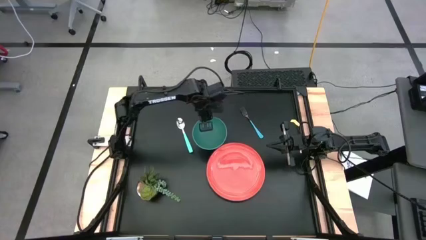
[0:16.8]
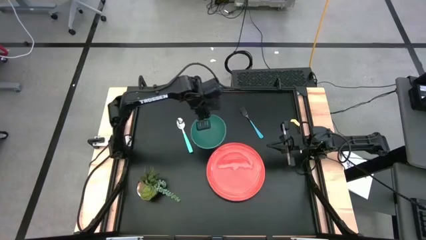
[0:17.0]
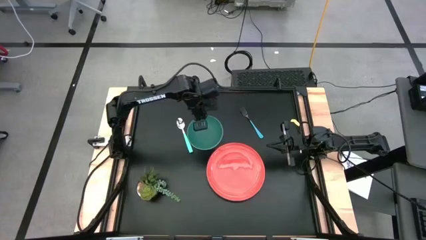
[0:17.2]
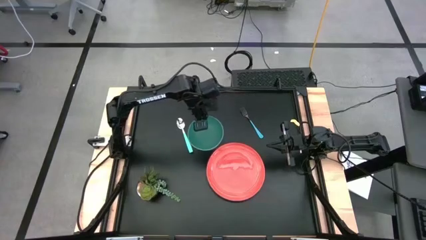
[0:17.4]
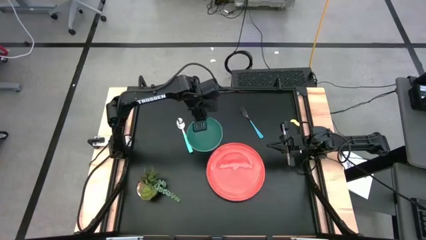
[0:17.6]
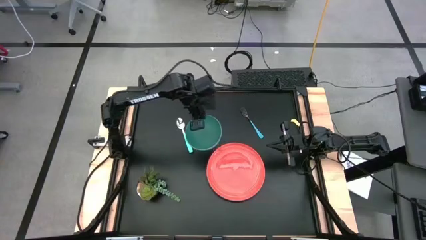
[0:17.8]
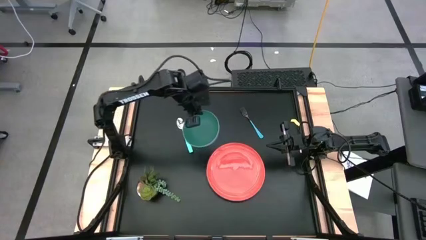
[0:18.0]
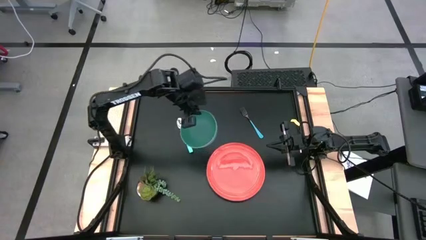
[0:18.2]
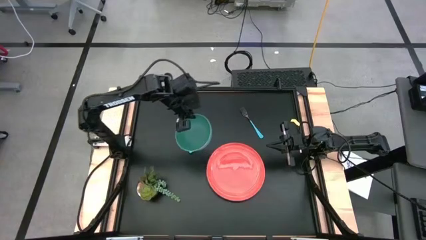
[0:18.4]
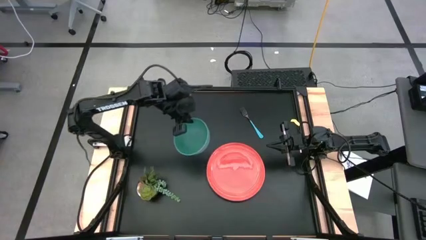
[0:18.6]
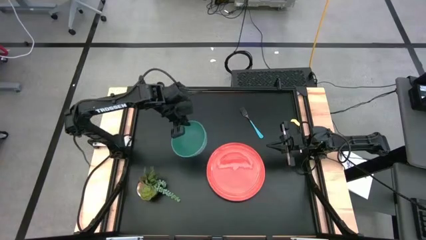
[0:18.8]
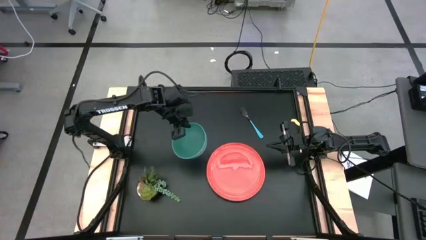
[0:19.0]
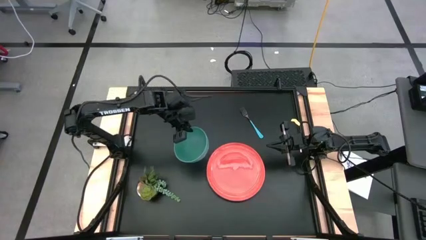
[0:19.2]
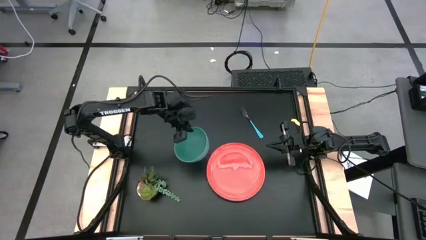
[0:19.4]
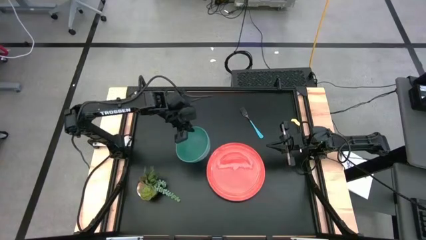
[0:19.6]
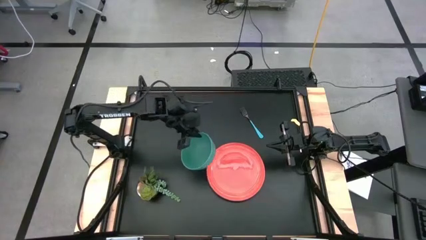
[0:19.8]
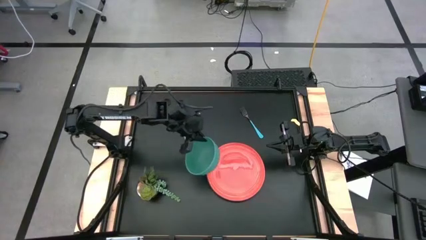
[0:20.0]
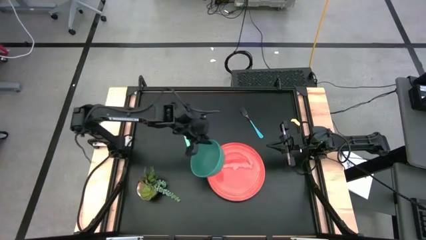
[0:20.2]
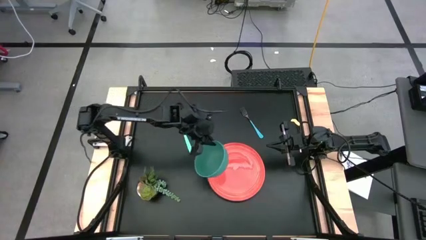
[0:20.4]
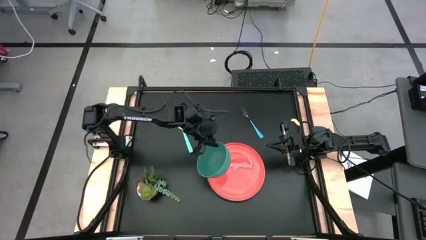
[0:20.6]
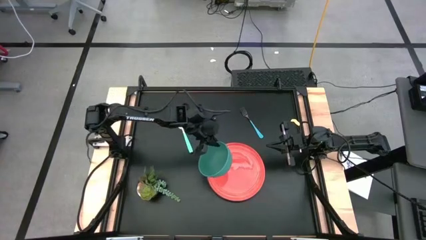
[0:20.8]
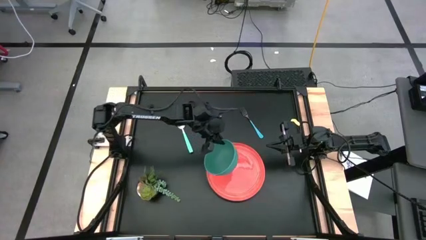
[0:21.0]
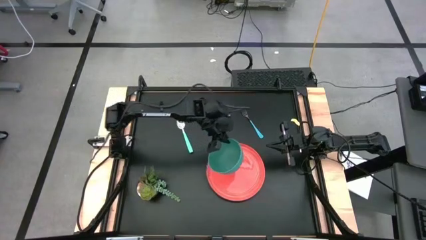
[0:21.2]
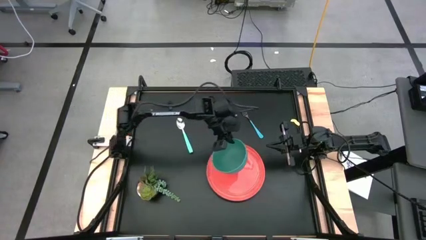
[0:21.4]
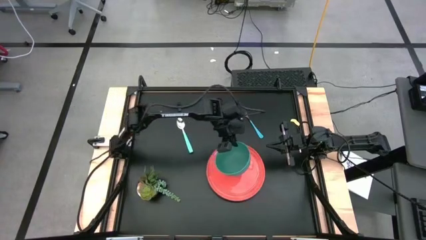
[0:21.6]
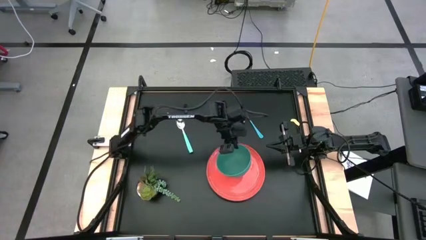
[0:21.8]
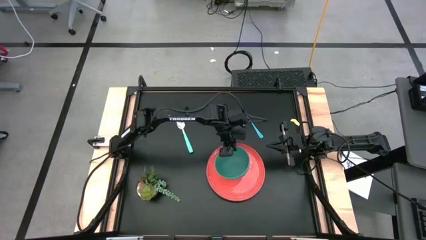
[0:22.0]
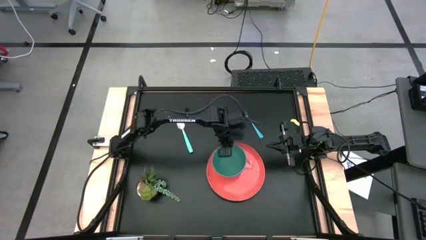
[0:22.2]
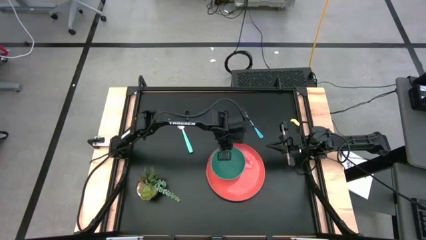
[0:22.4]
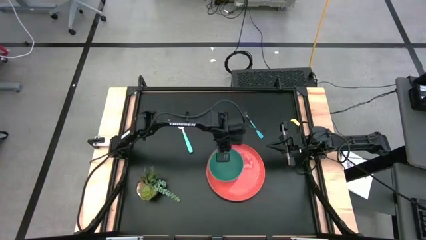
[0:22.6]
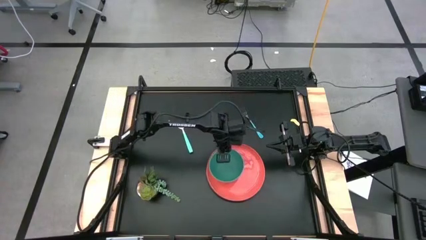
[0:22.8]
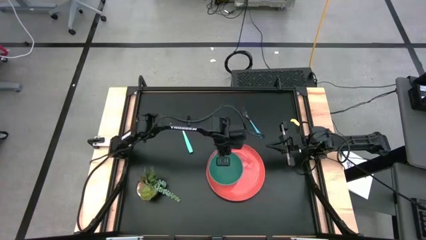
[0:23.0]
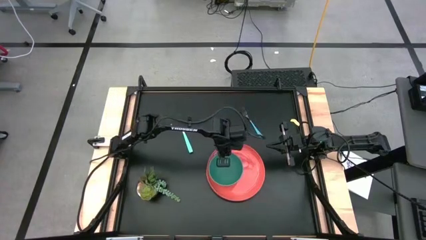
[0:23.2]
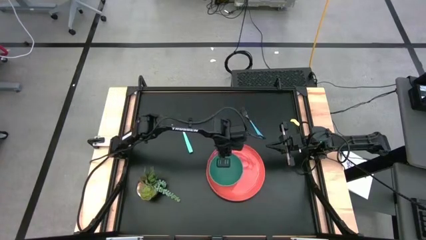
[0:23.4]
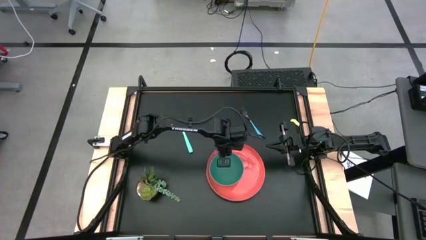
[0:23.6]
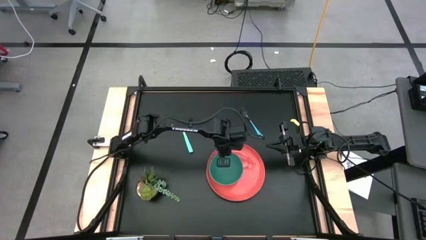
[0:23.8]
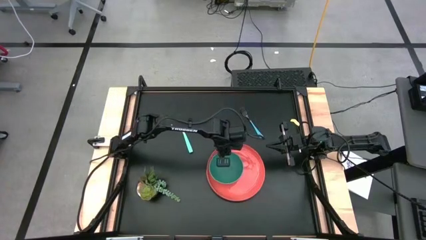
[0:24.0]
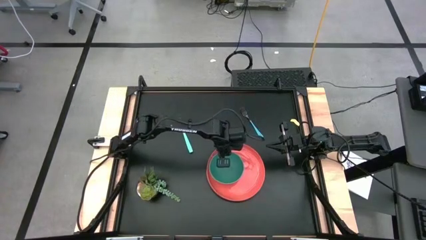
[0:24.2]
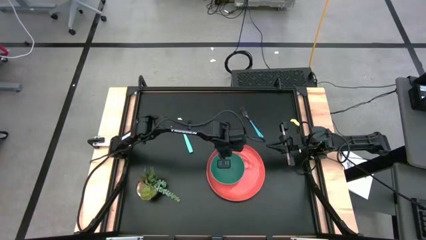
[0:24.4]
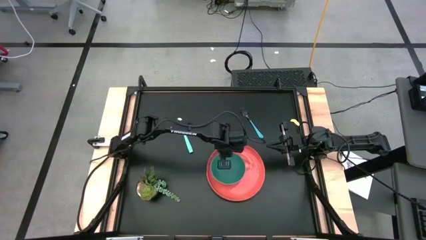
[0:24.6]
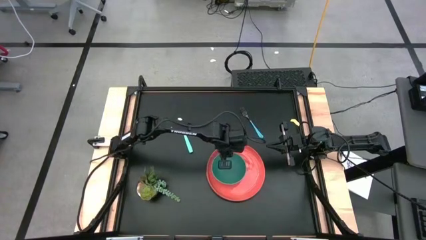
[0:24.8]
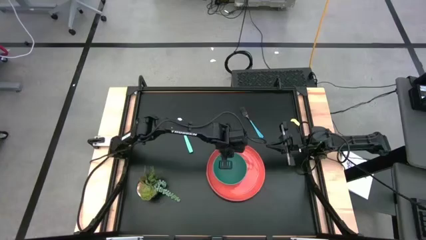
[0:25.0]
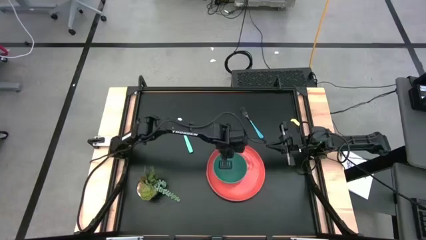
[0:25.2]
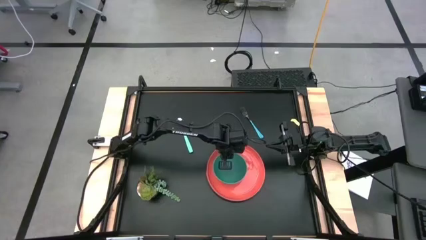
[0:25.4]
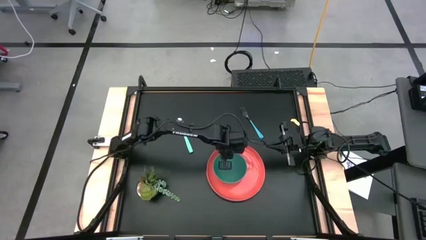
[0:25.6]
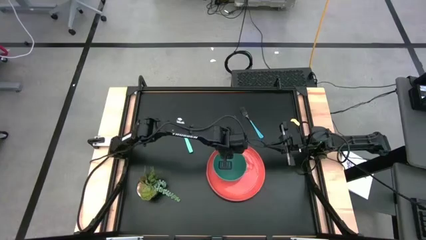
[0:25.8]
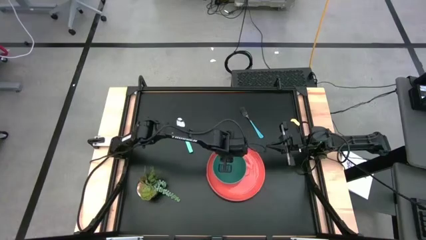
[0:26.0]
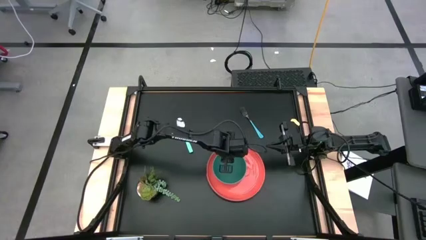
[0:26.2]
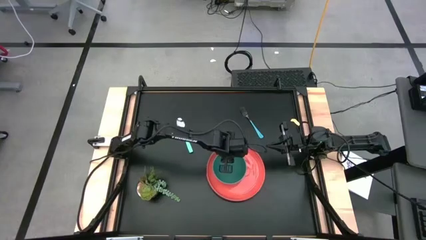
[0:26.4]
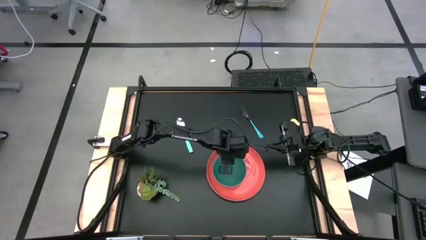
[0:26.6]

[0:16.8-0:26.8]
Task: Pick and place plate/cup/fork/spoon on tray
Put the green bowl on top of the orange plate

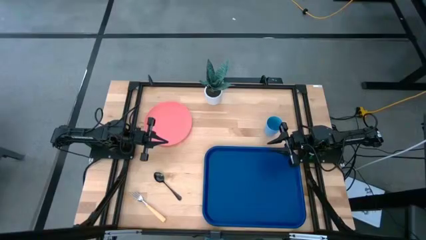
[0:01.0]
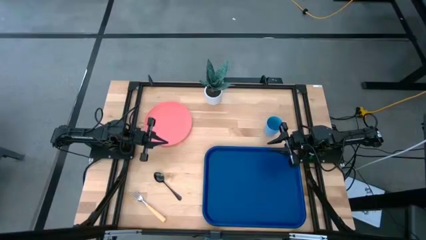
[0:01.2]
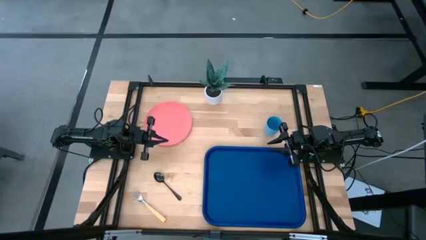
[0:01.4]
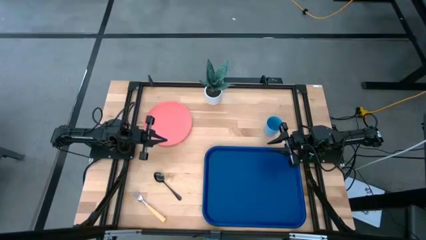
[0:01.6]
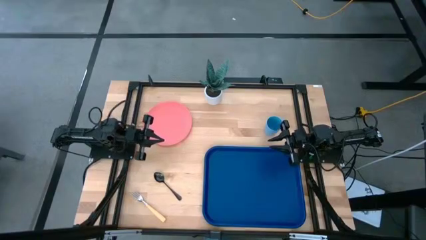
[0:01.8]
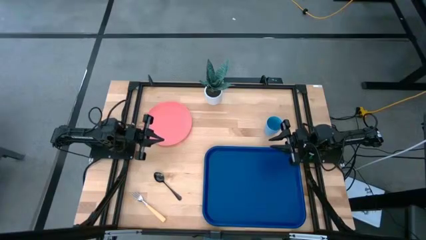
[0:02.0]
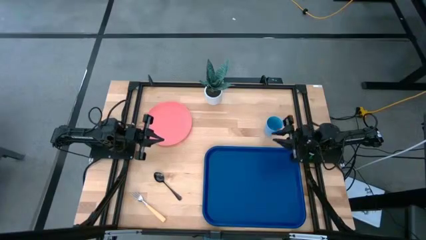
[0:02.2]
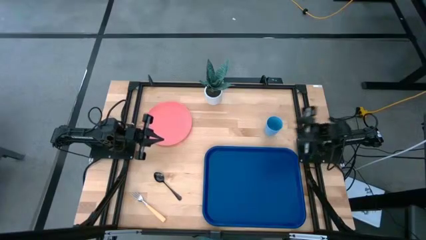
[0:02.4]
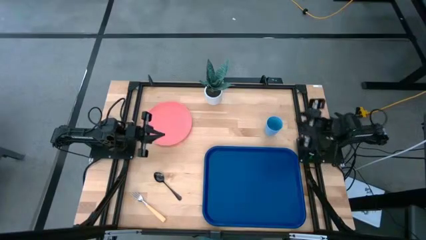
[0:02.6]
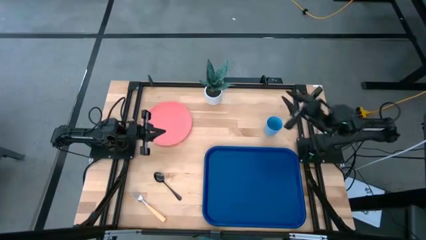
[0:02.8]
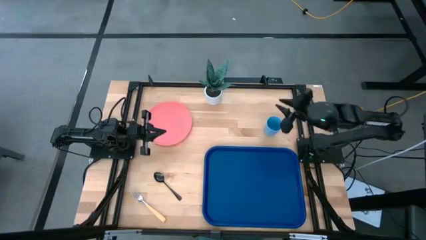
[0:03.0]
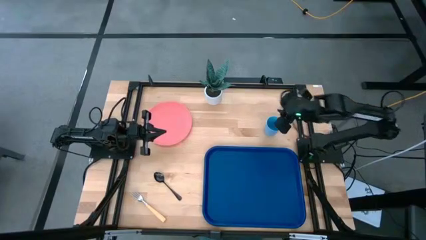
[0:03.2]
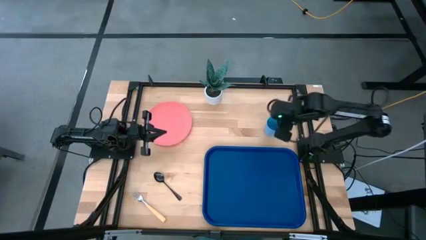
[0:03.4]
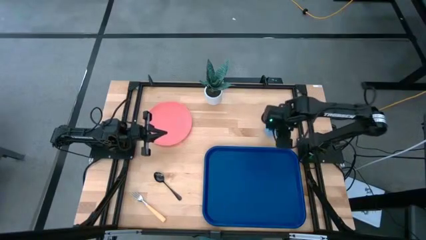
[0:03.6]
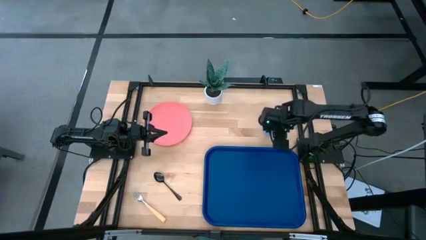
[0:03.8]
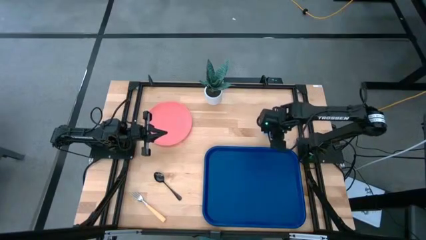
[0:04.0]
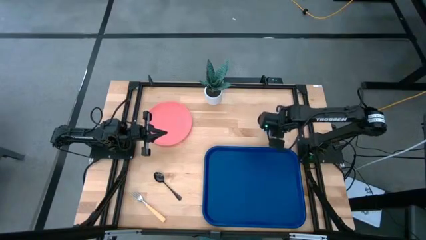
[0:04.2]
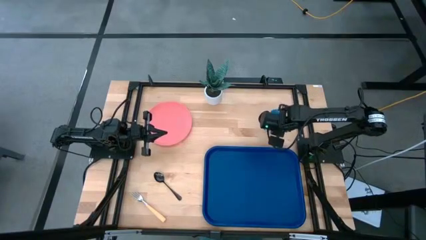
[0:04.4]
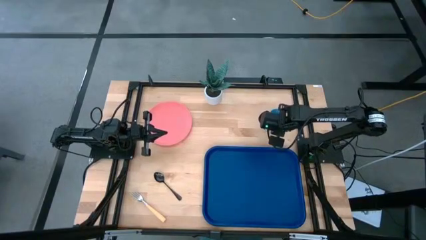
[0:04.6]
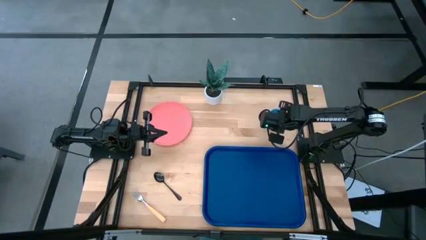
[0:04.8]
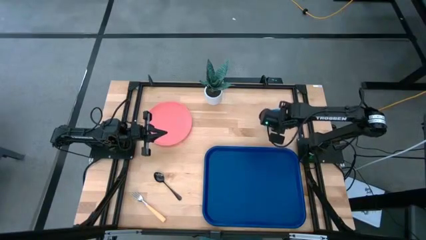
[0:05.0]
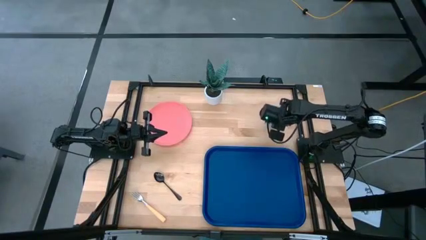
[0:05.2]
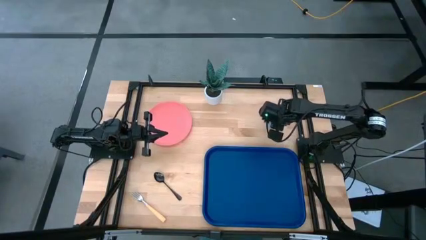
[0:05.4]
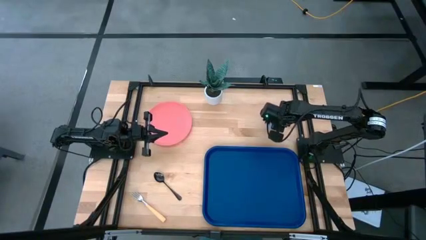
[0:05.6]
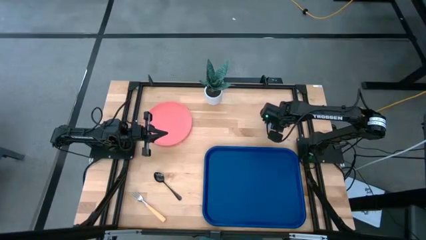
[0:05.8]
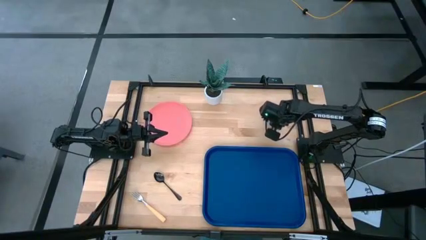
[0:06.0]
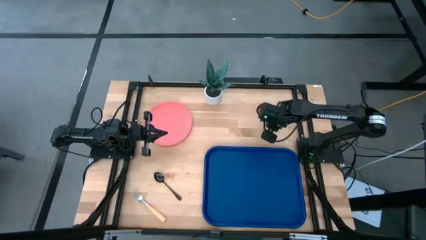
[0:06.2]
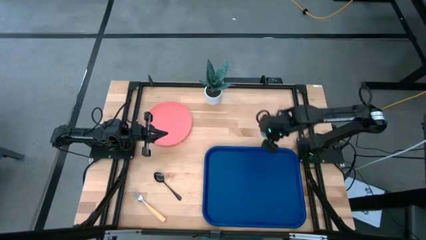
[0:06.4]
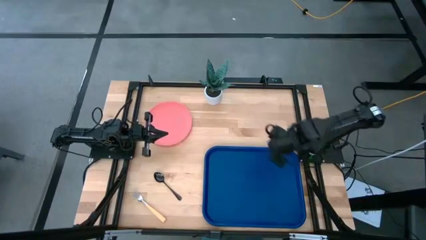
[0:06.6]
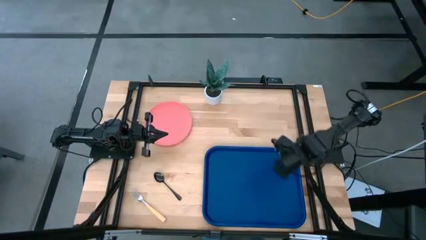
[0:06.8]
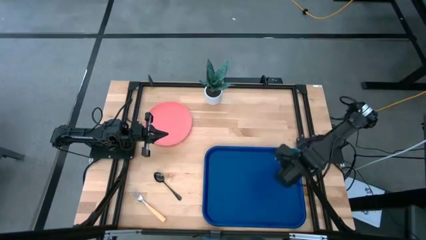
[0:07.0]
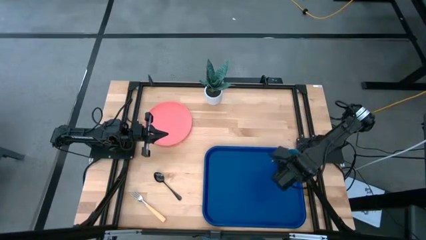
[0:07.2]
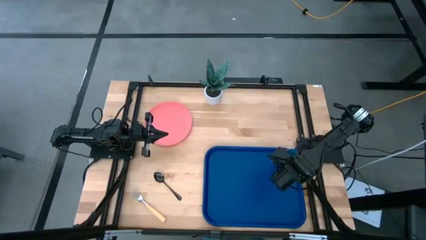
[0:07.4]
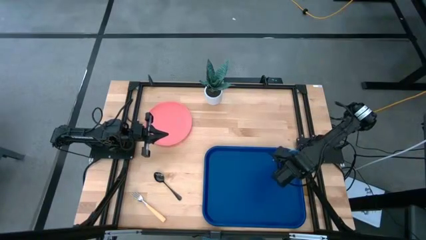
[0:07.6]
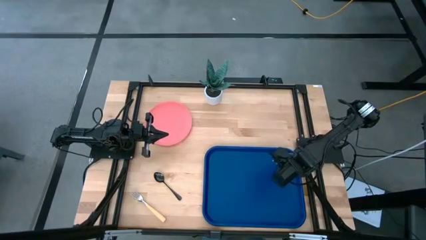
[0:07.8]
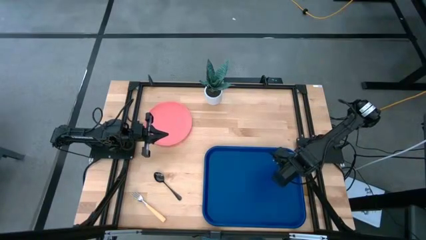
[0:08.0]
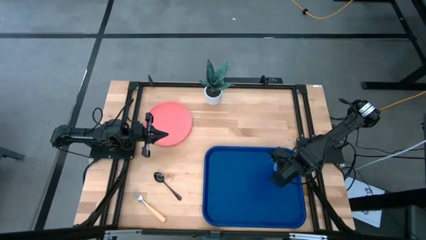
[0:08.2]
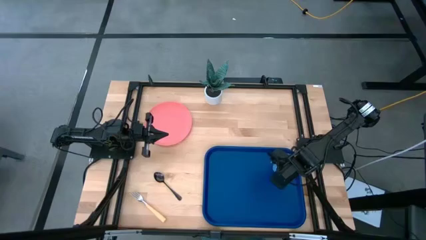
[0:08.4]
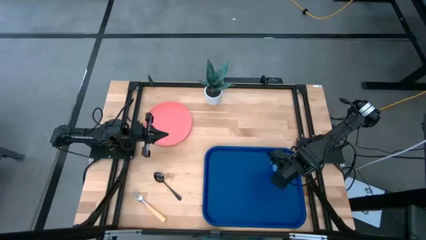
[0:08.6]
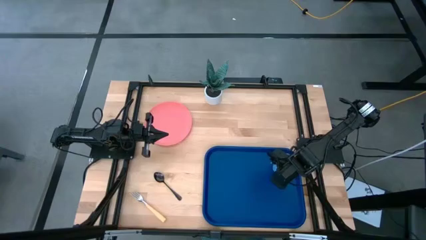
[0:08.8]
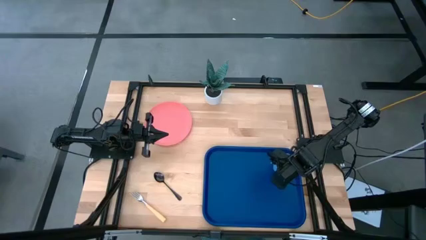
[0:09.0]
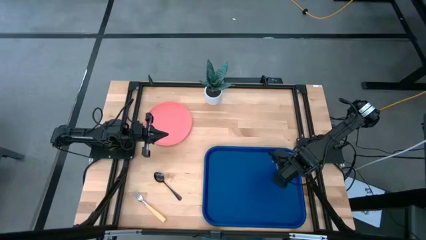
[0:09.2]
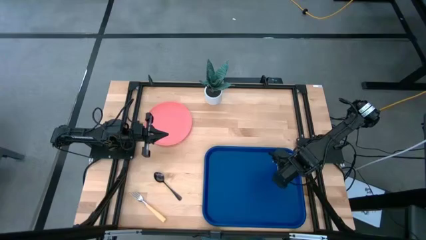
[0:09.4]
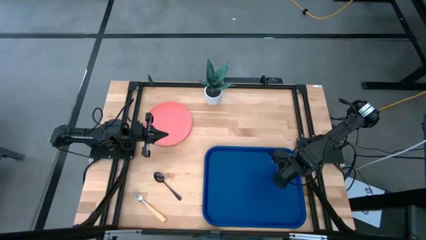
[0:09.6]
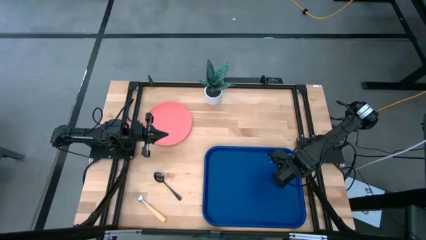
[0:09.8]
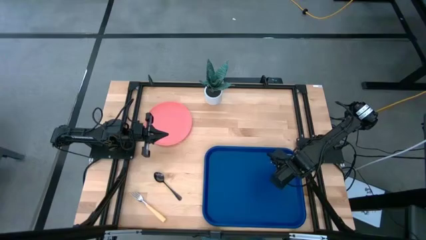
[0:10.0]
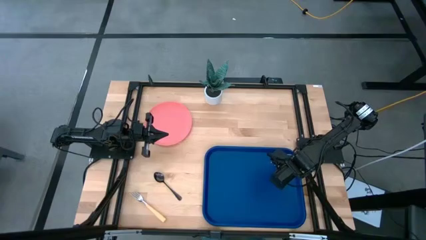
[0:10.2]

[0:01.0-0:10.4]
Task: Pick and place plate/cup/fork/spoon on tray
Put the light blue cup on the upper right corner of the blue tray
